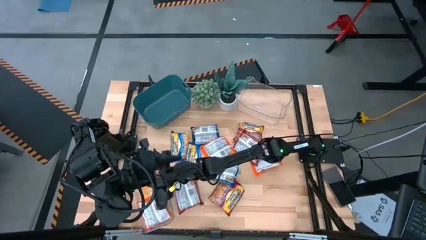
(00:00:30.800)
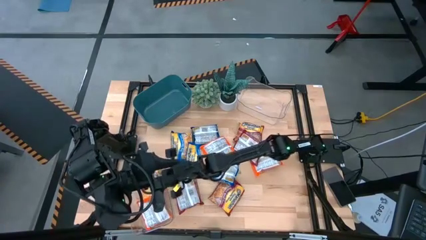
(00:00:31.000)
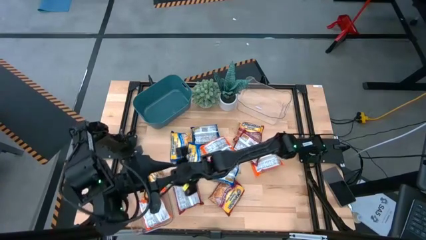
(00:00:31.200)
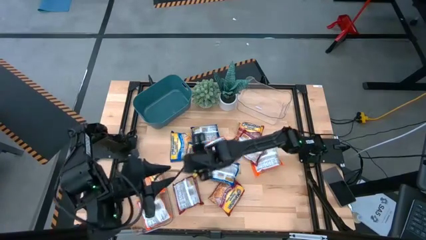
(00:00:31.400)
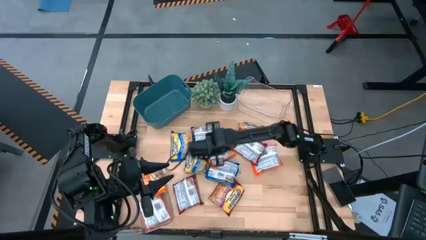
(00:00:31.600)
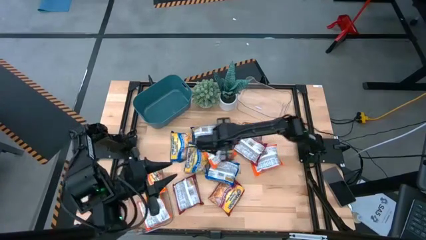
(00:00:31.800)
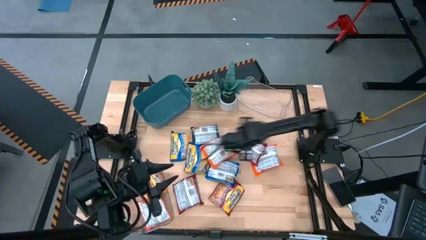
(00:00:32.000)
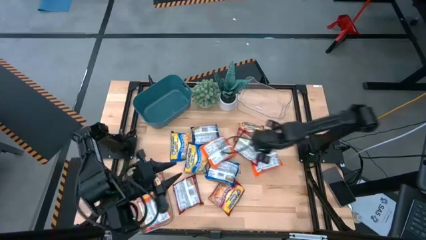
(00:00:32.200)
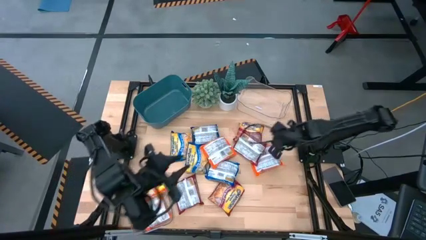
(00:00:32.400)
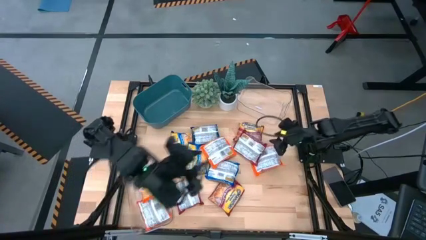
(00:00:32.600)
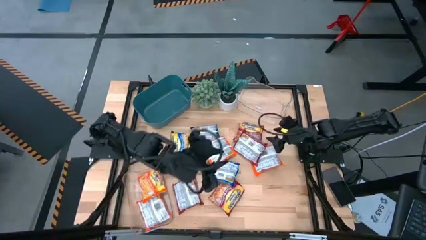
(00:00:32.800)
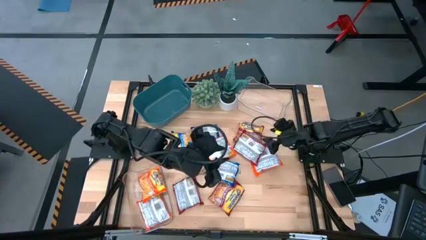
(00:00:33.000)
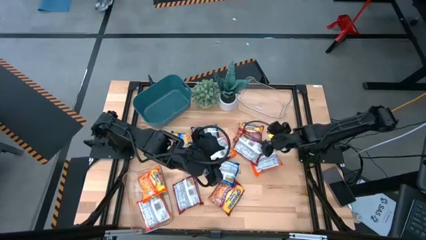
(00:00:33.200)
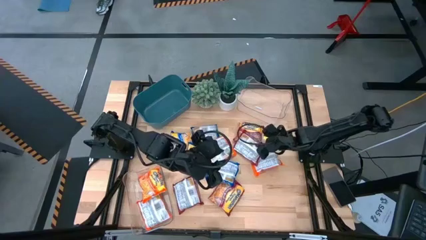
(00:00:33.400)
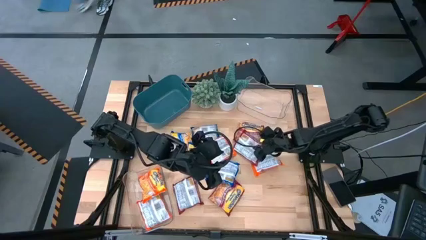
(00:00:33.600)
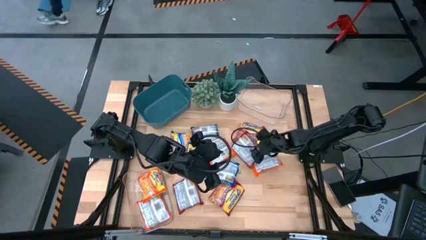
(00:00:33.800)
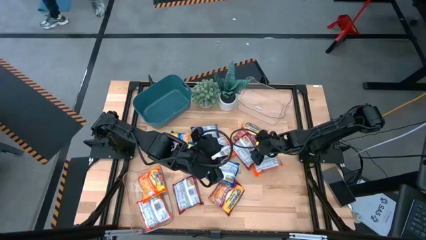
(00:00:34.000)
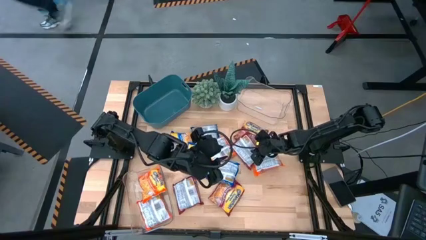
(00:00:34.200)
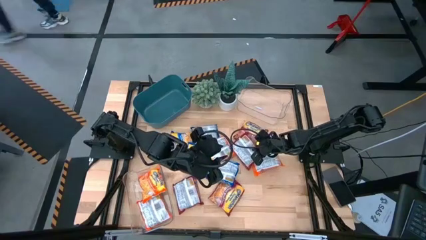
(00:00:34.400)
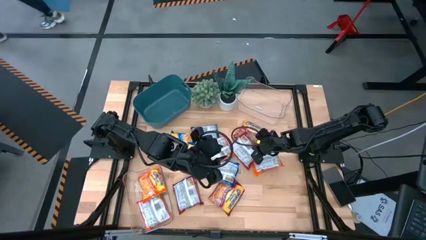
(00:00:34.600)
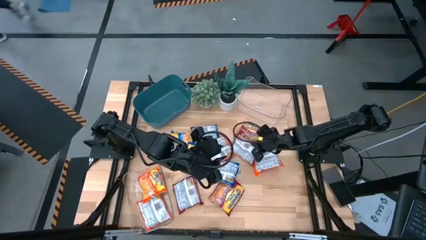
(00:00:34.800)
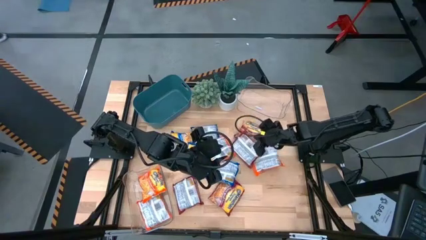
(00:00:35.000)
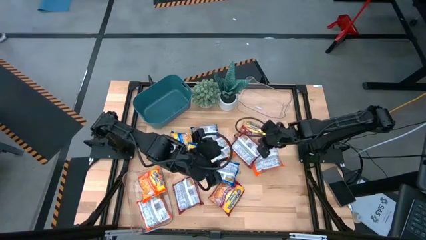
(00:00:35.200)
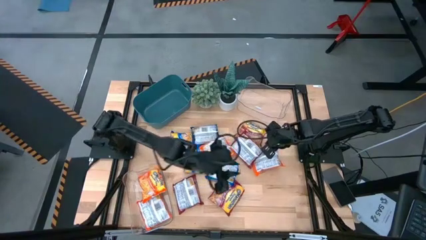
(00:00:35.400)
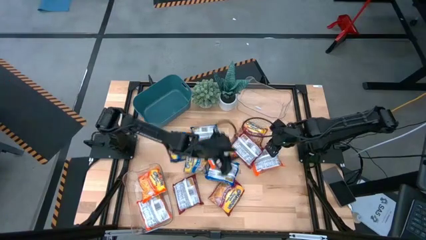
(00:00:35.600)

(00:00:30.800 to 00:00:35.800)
Task: Sort Maruchan noodles
Put the red noodle pack into the top transparent bin

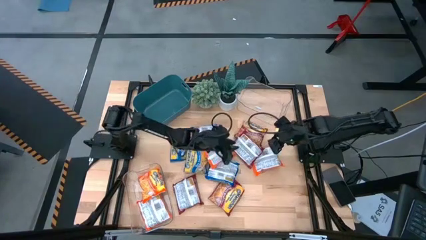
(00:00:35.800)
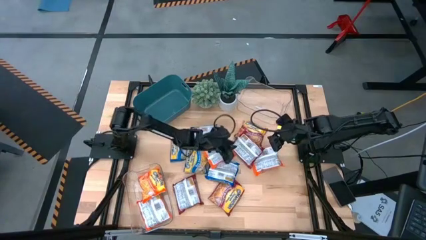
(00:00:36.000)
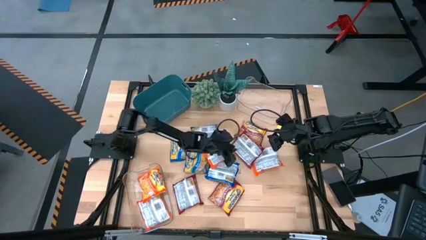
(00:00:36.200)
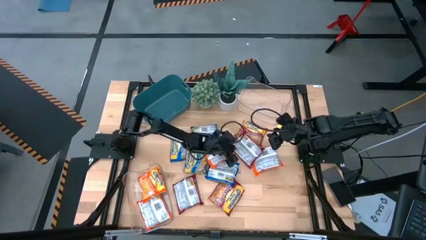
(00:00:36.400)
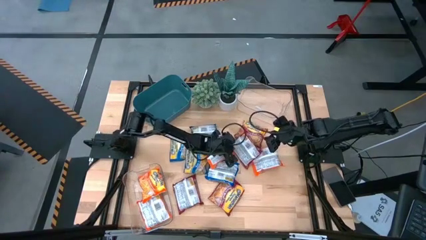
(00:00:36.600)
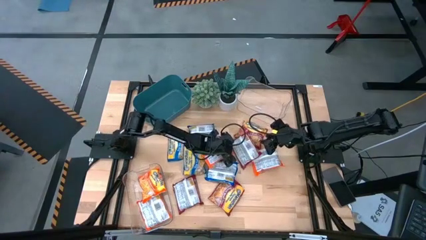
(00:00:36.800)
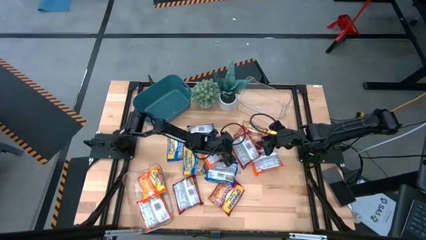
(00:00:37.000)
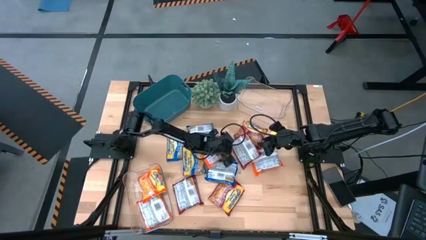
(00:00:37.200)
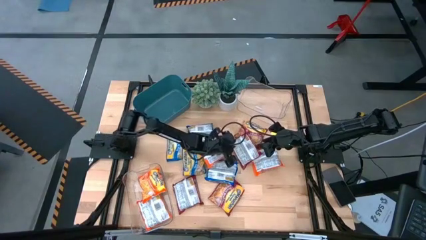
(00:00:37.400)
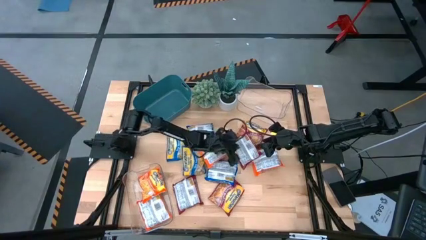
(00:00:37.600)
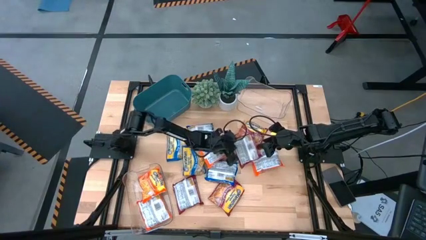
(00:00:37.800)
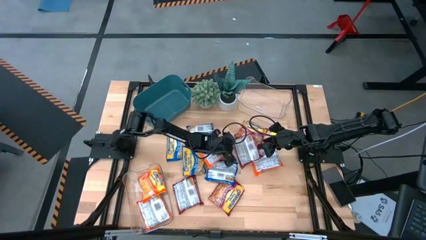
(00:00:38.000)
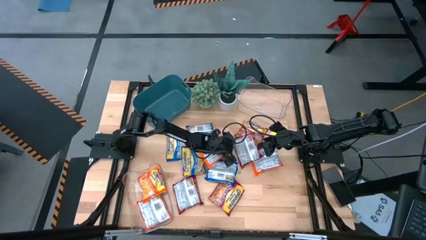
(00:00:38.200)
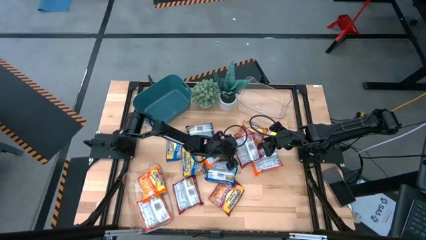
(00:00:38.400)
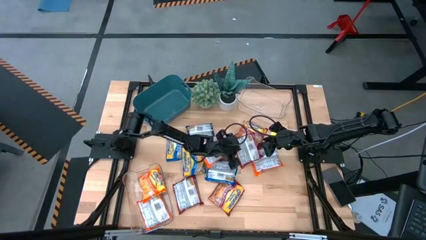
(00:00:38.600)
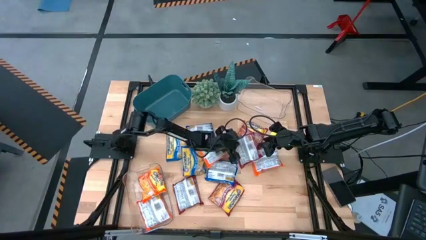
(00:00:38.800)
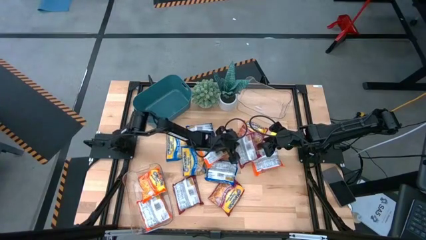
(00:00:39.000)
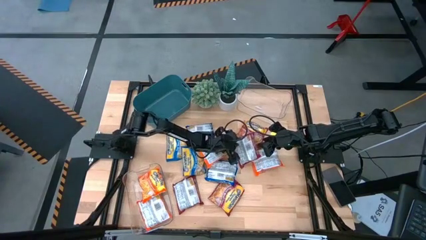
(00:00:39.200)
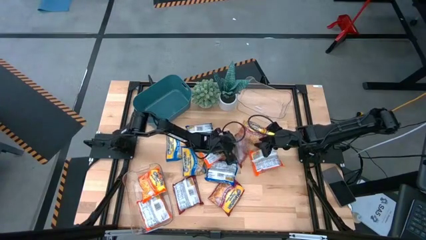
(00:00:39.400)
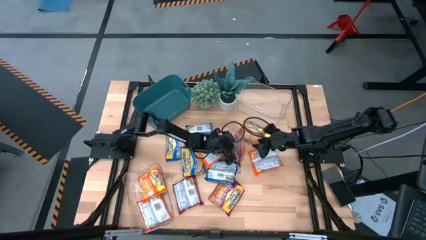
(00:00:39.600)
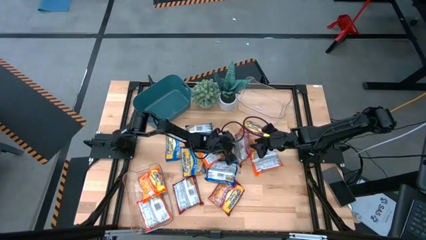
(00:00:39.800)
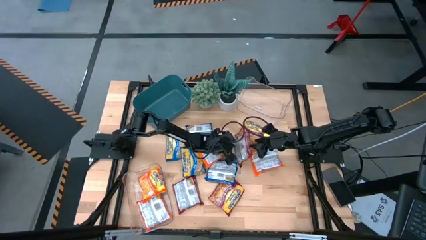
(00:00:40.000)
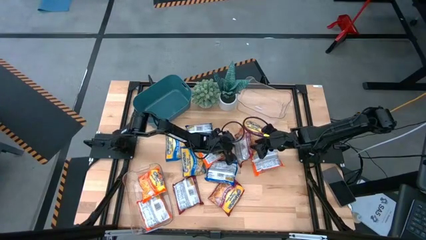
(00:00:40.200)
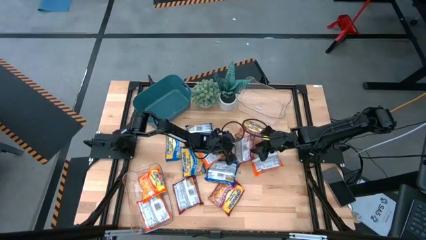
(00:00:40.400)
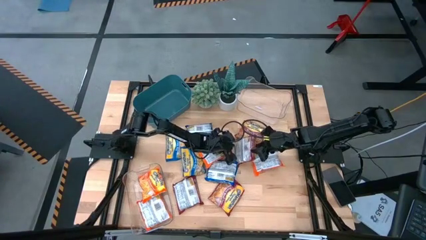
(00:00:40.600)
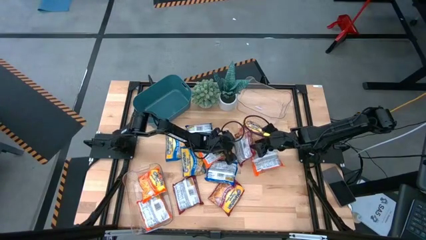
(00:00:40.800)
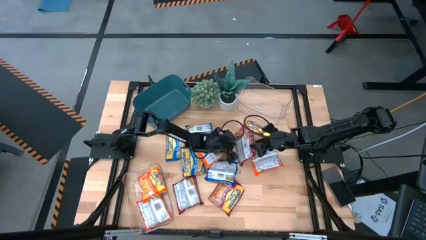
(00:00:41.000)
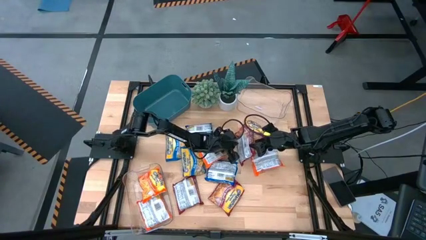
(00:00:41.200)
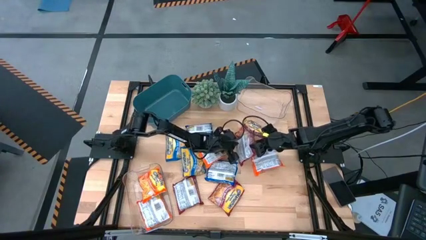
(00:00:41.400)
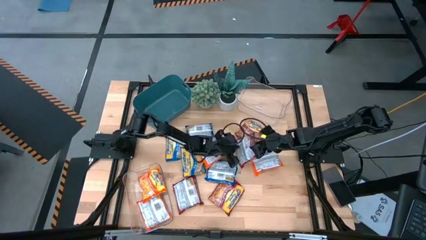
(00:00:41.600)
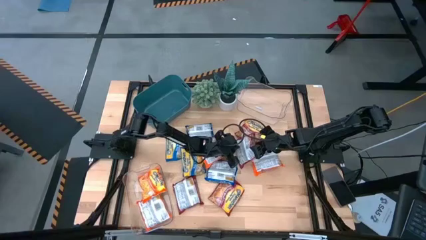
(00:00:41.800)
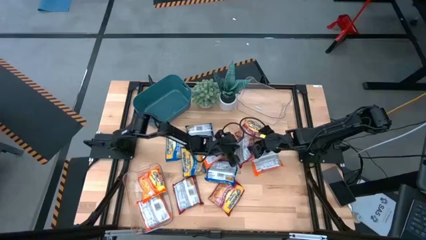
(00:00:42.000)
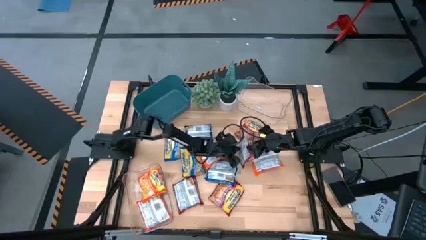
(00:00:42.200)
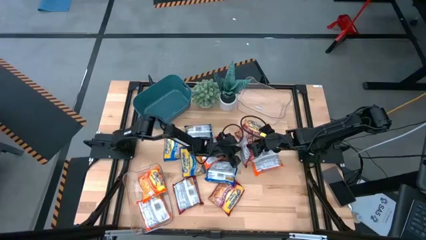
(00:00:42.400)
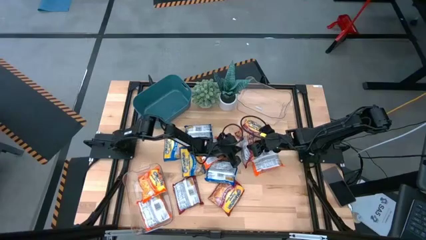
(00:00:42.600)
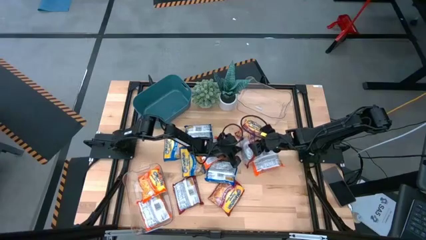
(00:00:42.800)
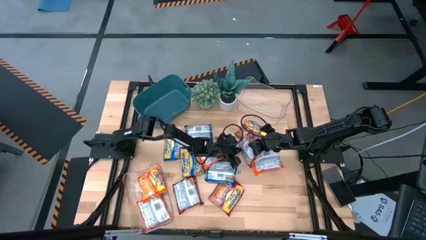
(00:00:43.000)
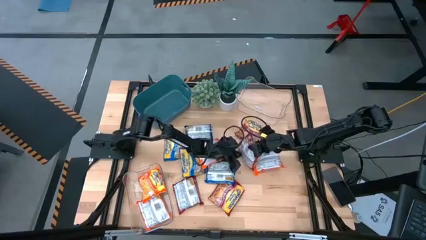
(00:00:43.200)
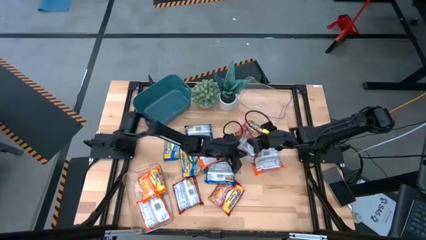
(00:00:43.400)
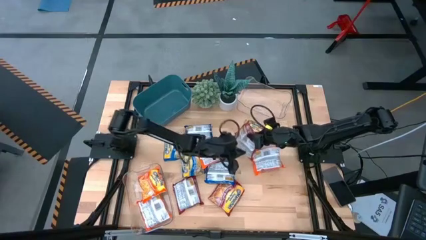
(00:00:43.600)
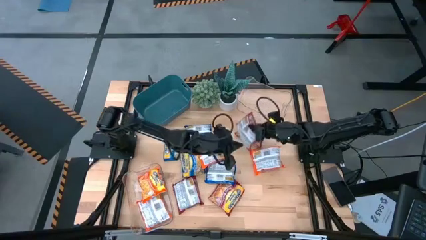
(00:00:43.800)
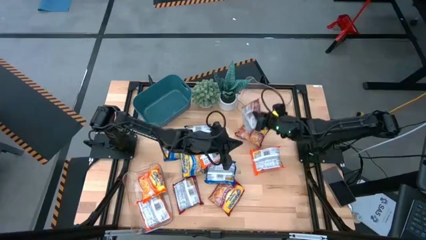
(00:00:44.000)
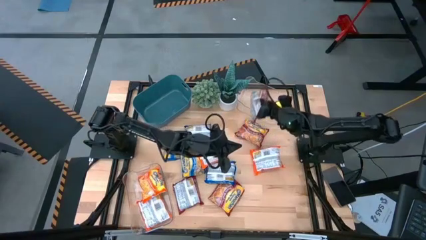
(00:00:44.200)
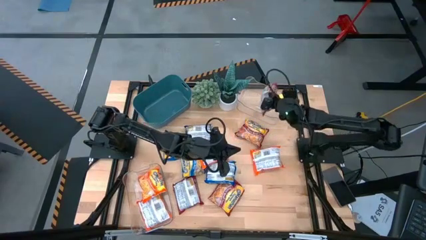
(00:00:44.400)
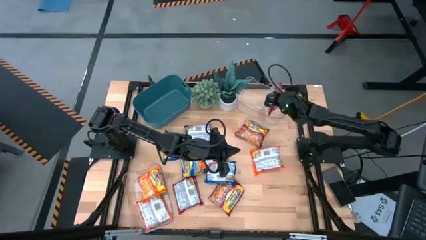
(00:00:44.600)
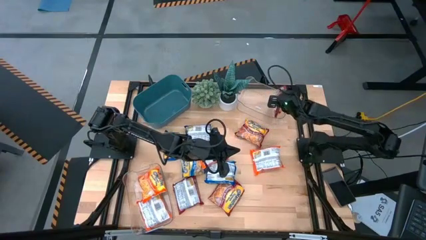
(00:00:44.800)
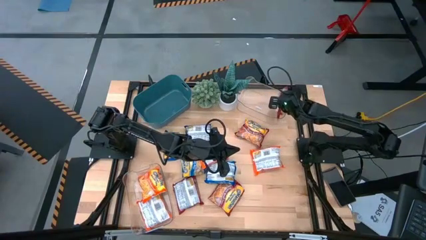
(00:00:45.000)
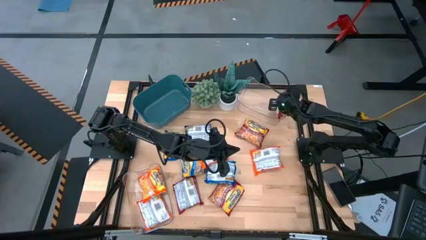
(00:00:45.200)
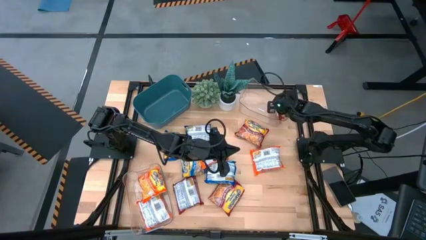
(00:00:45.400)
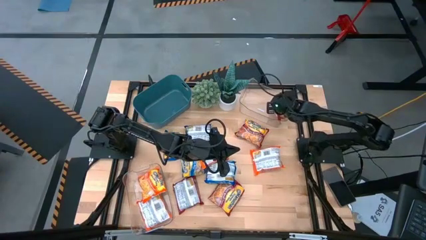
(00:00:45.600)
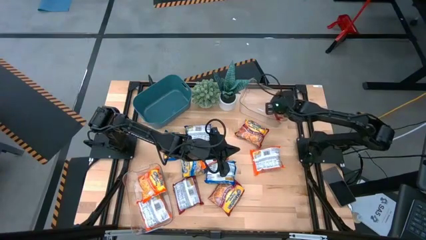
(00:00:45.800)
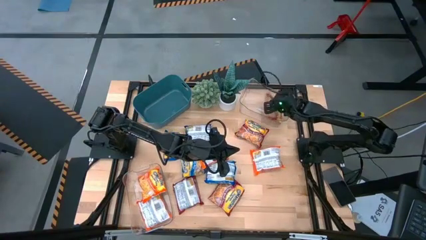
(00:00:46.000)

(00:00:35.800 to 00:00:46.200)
Put the red noodle pack into the top transparent bin
